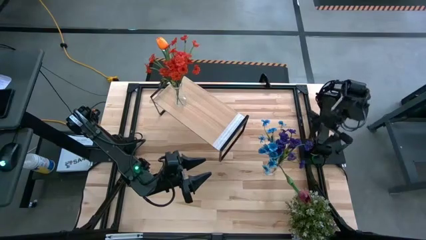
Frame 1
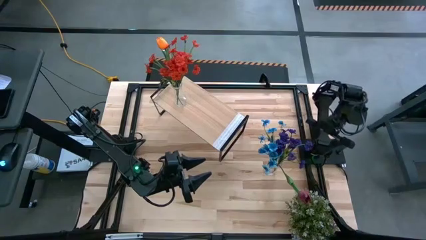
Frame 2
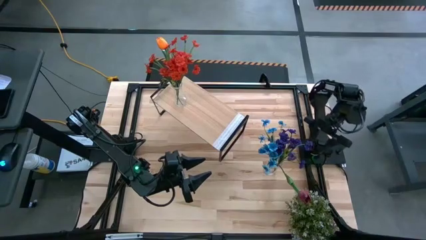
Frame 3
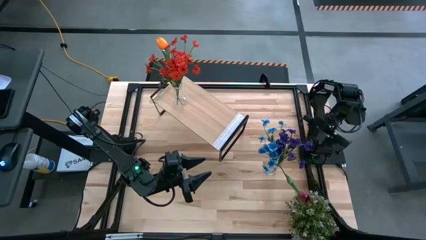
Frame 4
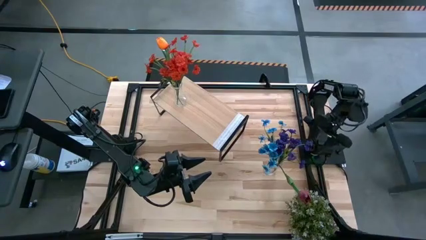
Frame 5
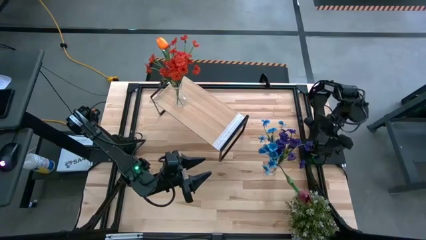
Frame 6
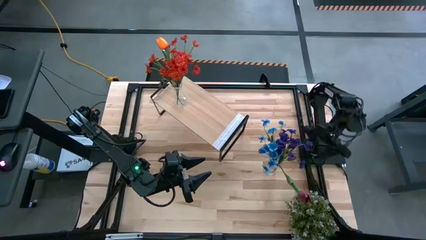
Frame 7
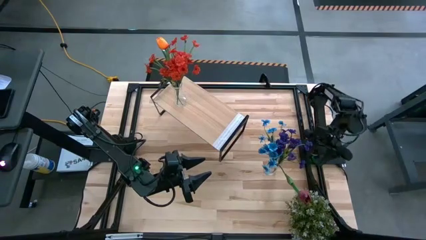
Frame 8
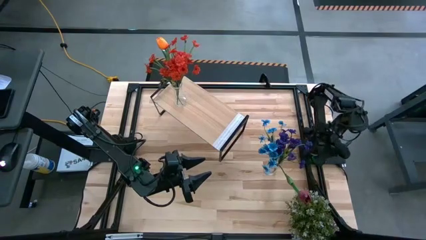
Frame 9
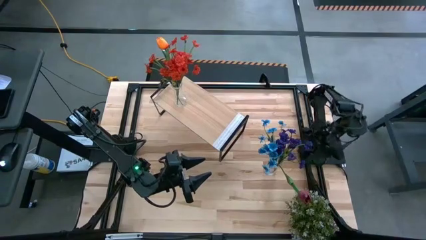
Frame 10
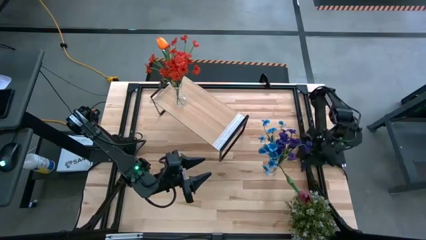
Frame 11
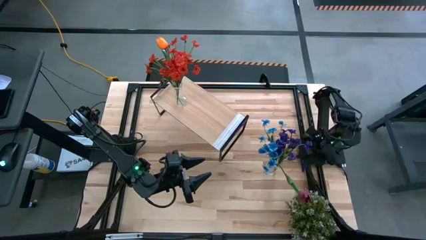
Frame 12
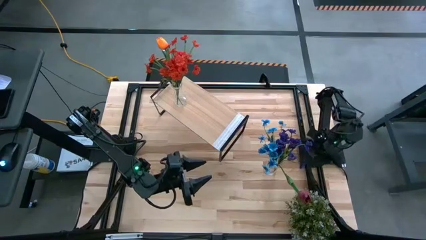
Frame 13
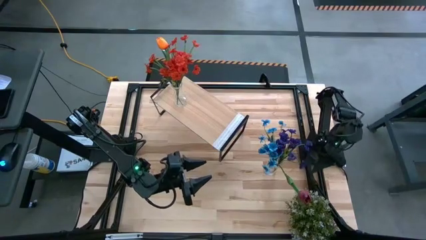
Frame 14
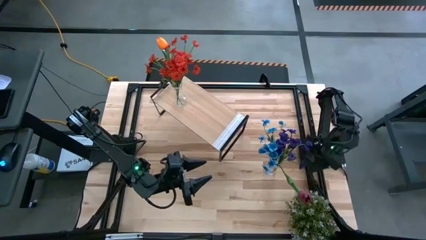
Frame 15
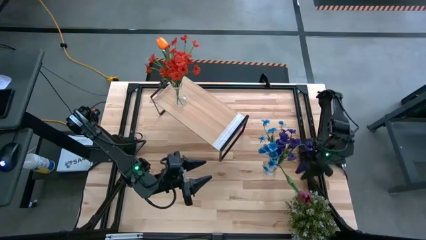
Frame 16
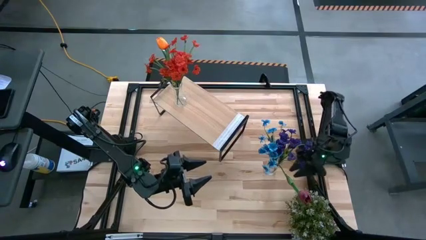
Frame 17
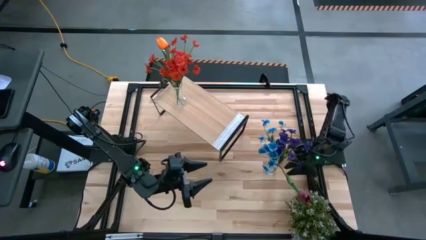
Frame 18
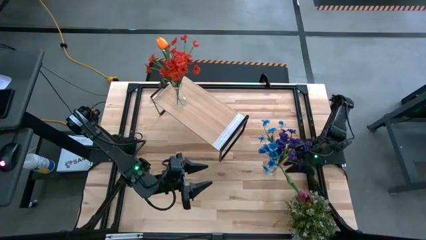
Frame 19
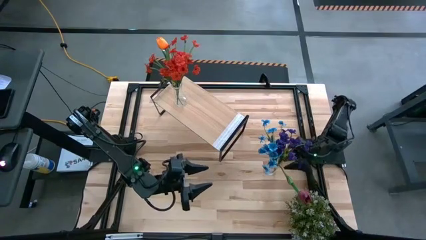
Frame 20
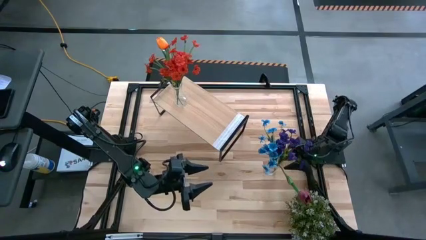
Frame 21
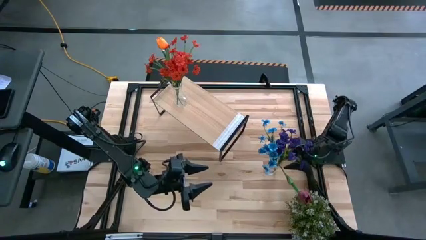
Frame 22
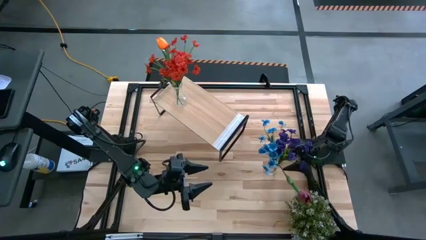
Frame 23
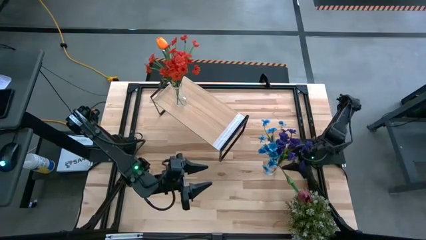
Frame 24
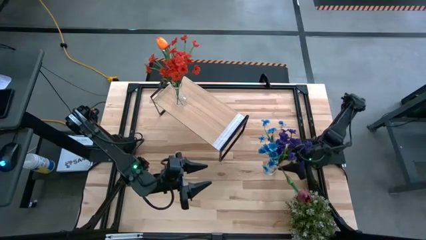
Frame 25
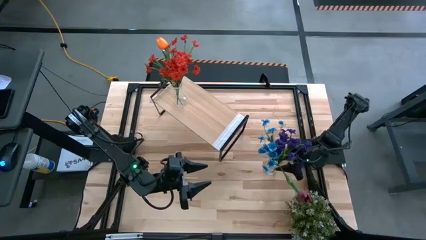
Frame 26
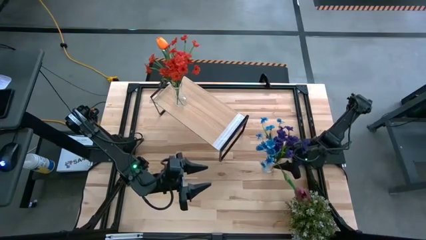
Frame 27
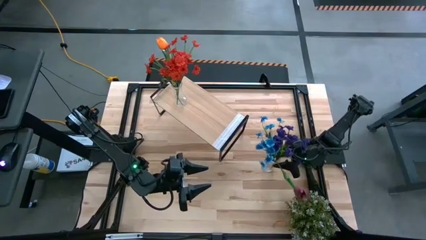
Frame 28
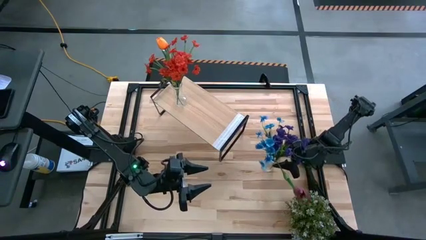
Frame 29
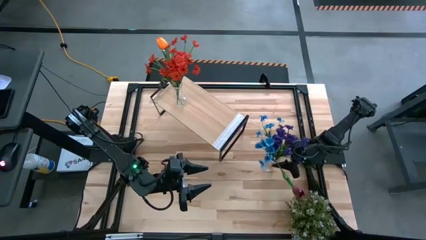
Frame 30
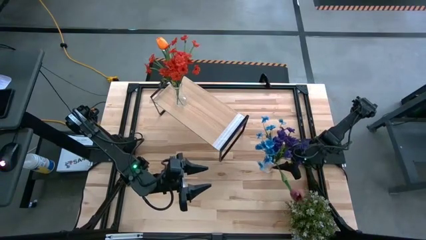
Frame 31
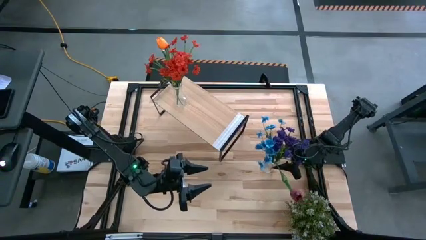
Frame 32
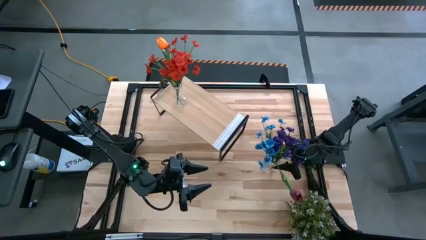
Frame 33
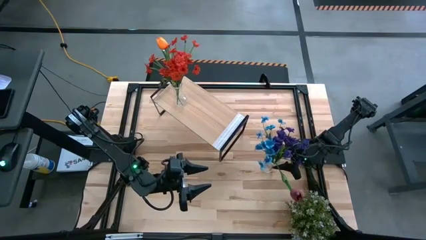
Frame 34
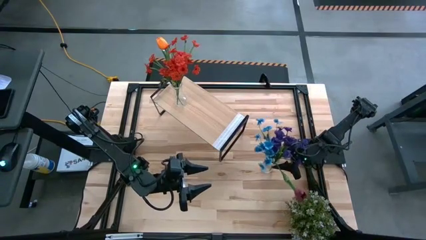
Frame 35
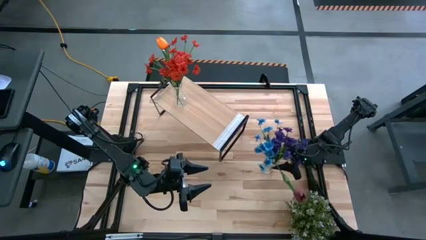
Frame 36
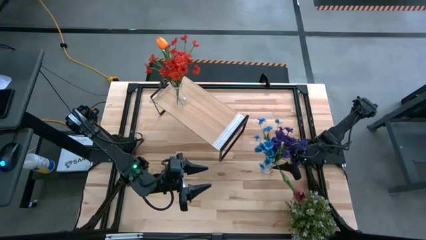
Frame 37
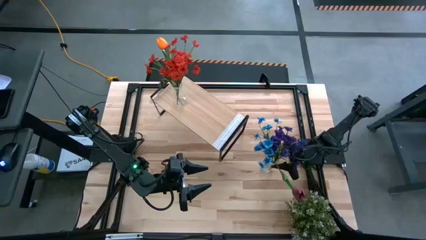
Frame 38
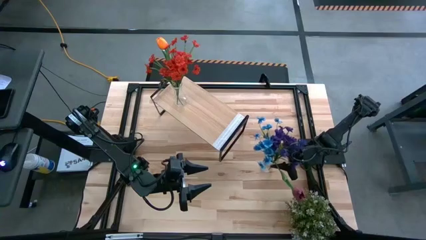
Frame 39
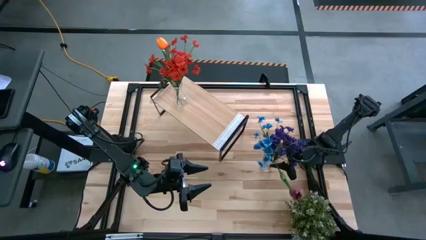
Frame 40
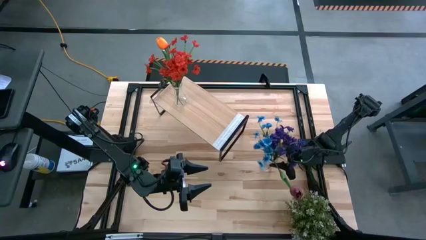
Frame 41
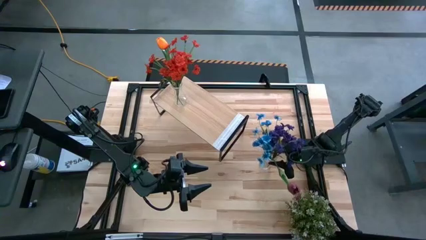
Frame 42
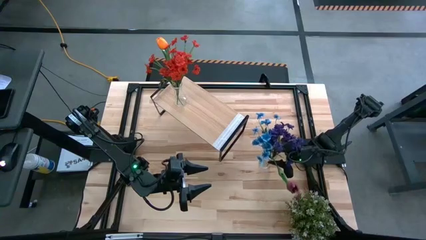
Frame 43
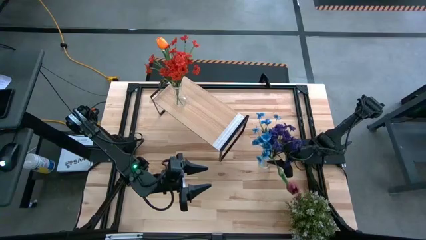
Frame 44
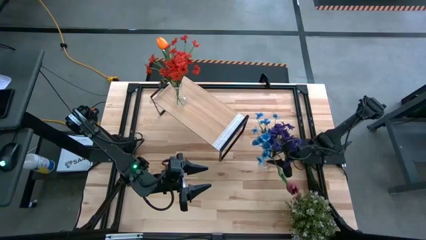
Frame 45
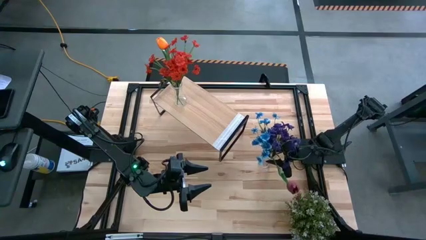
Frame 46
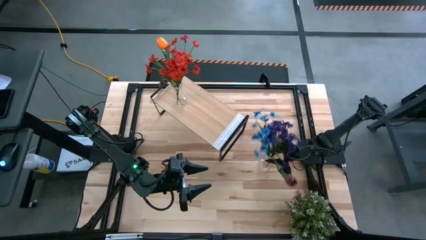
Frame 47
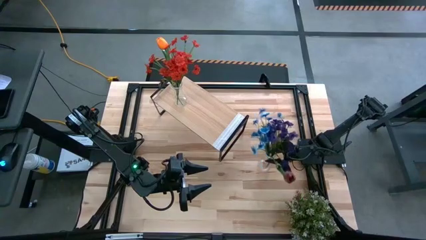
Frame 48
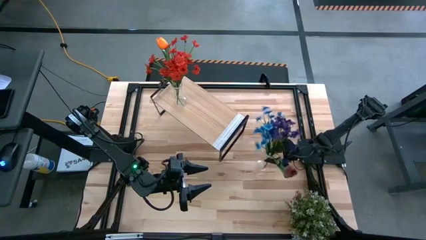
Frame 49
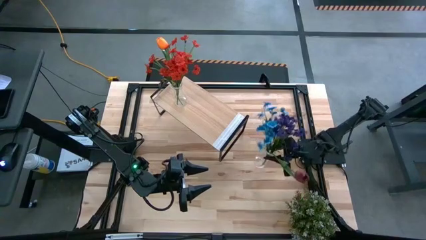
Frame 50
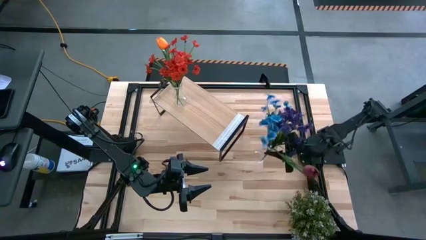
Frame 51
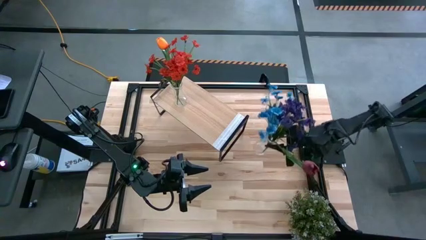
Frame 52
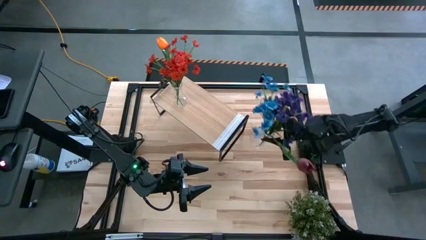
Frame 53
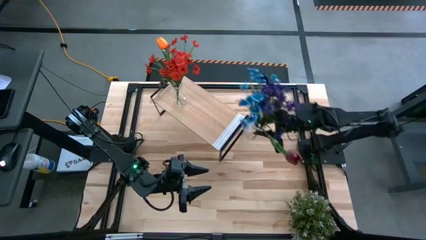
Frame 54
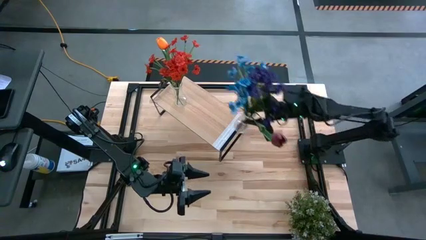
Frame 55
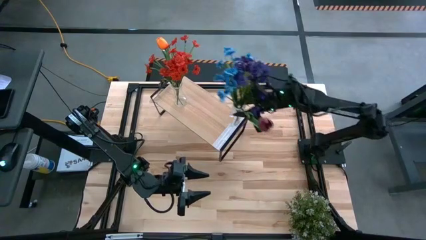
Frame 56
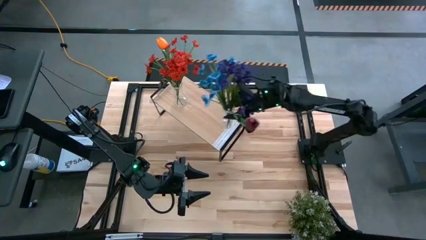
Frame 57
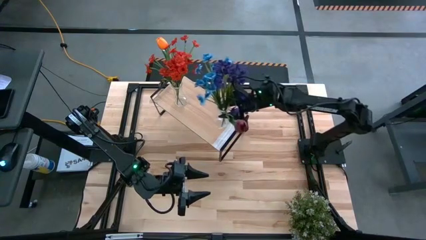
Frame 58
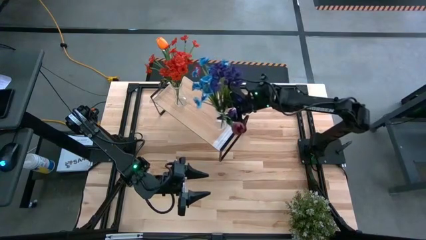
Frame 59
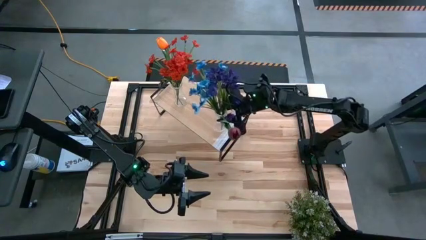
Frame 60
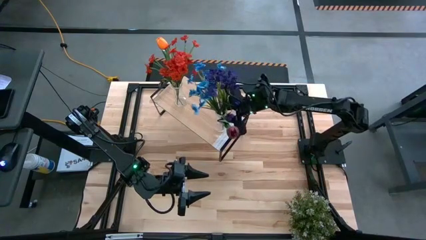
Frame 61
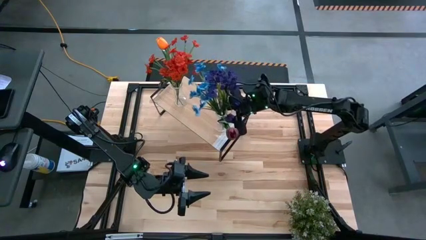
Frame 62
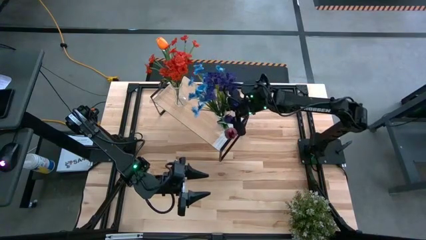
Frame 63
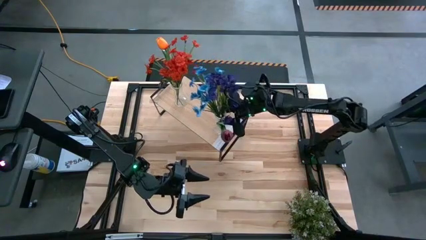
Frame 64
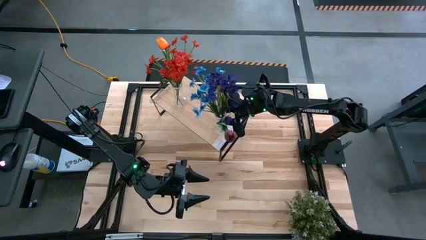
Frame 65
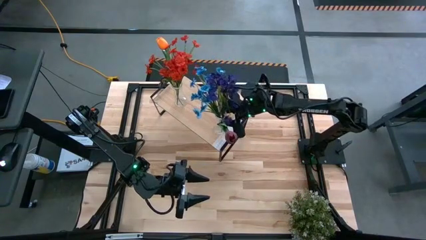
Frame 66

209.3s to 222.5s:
Task: Pick and place flowers into a vace then onto a shelf
Put the transparent vase on the shelf

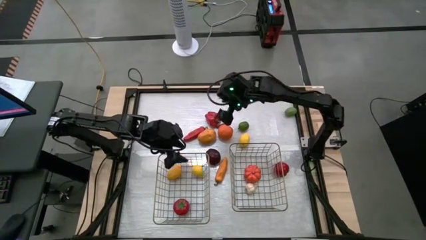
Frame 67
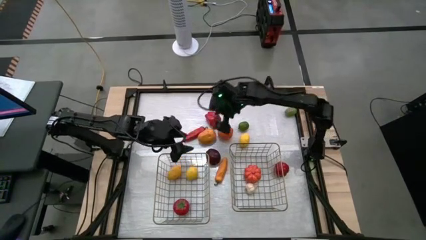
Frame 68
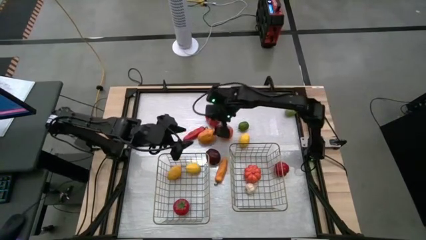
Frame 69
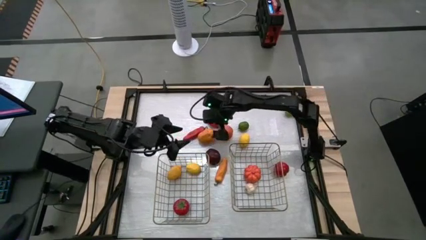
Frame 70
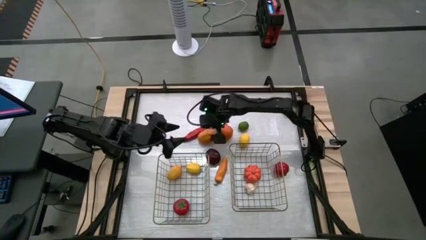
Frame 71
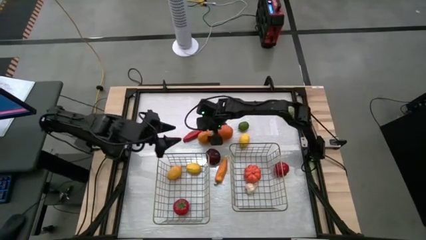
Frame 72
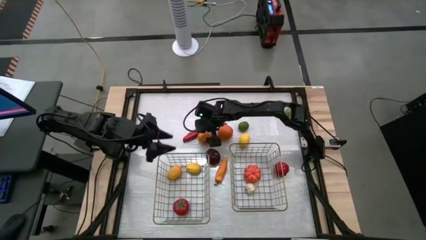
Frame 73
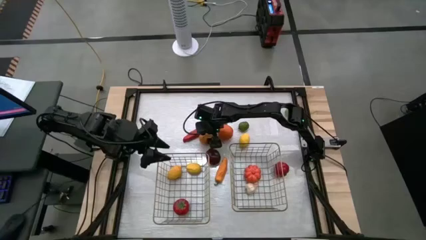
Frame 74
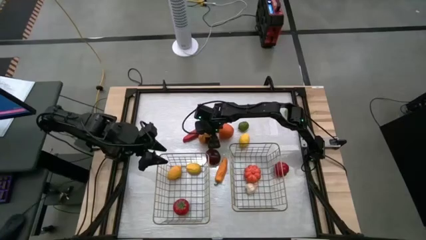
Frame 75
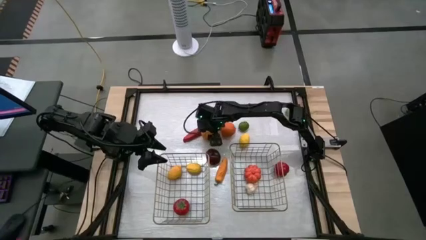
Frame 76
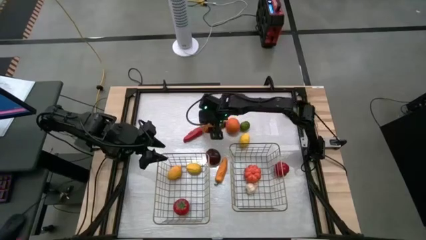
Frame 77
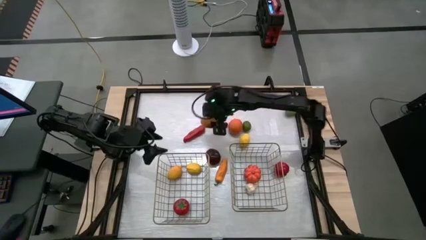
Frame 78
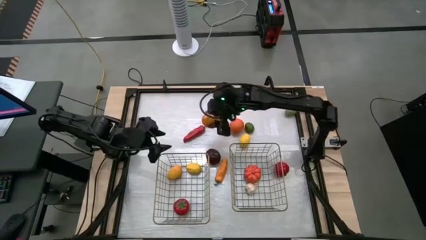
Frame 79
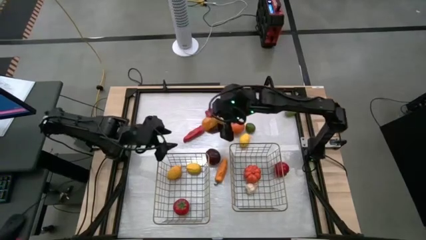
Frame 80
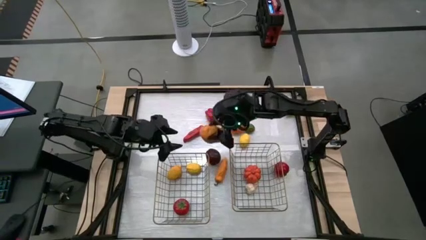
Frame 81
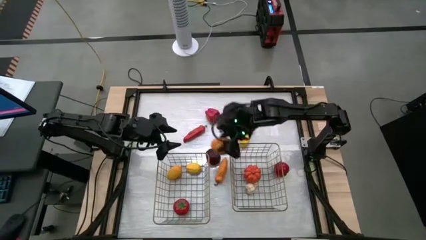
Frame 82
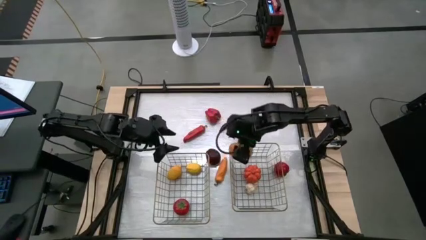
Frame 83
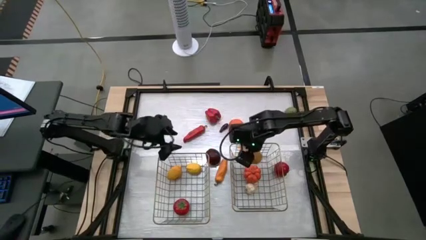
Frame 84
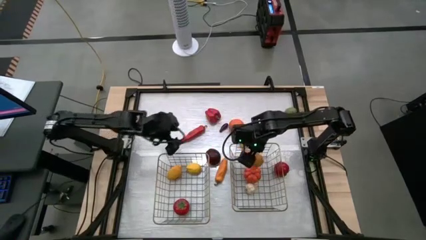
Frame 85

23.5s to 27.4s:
Task: Sort produce into baskets
Put the potato into the right brown wire basket
